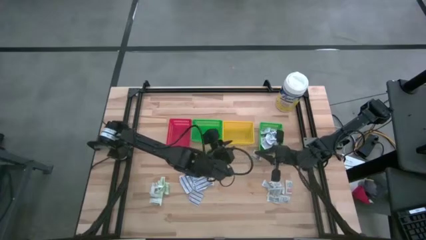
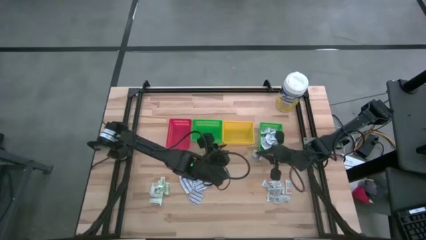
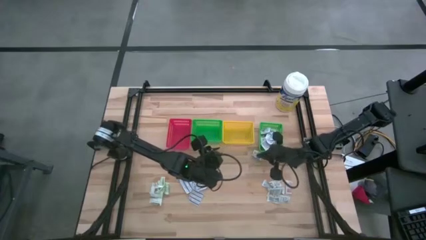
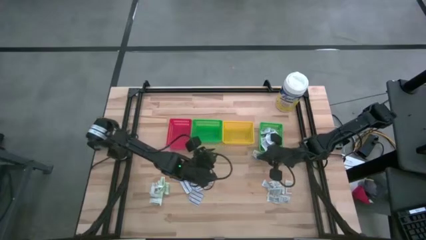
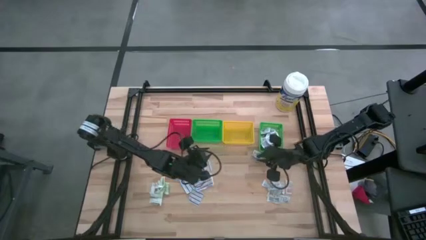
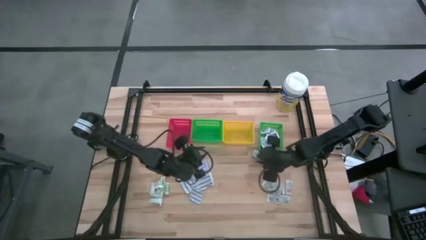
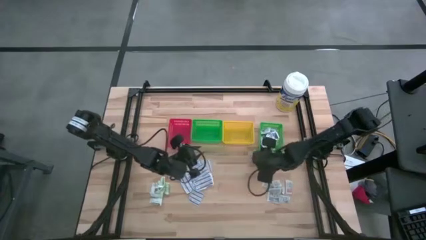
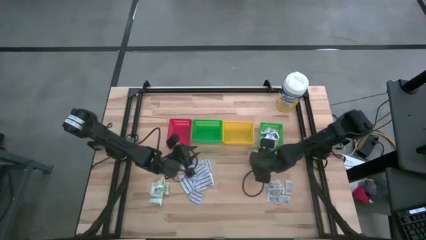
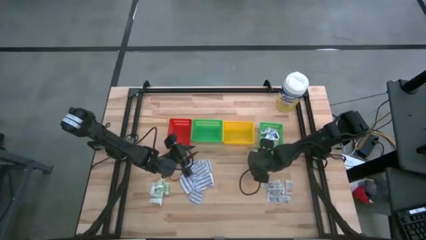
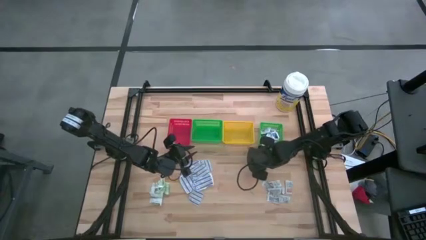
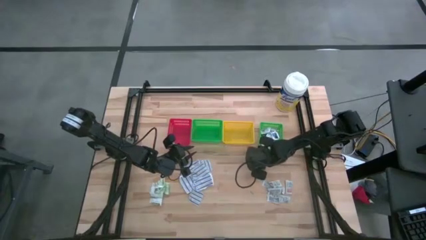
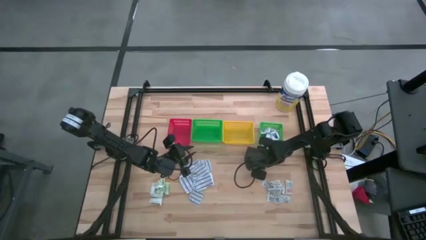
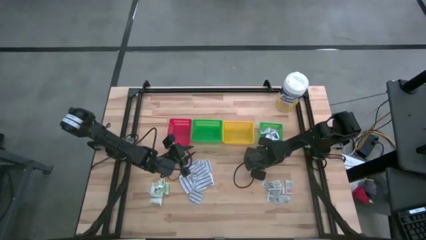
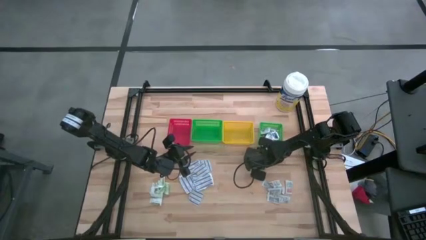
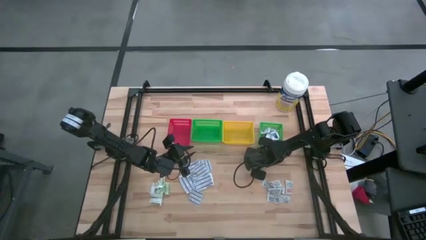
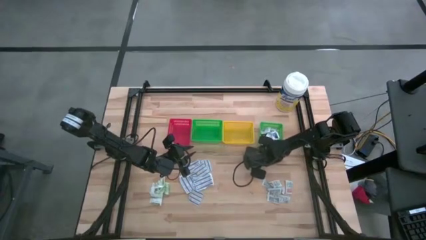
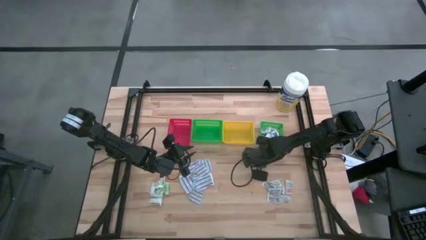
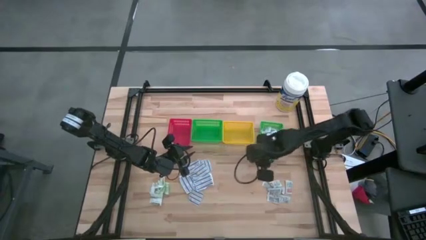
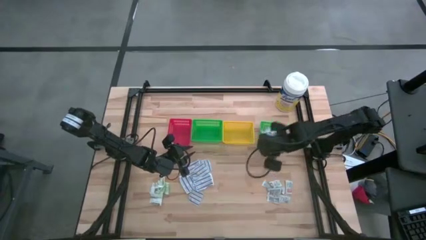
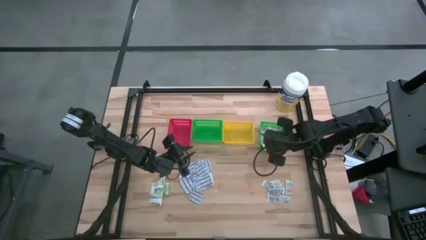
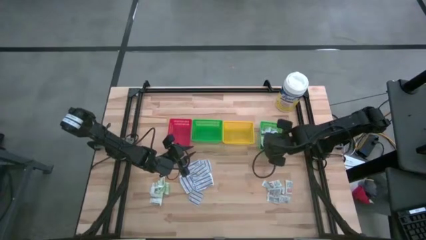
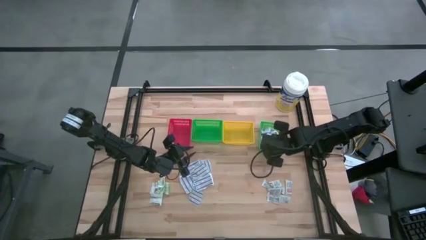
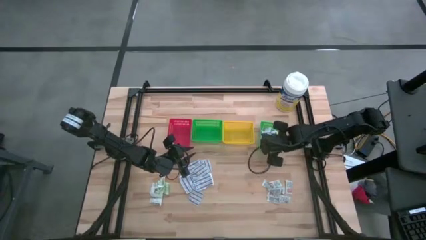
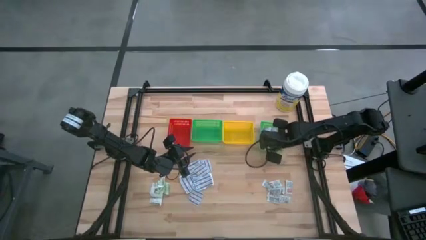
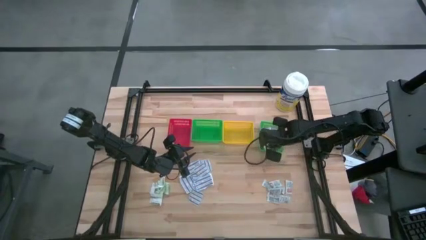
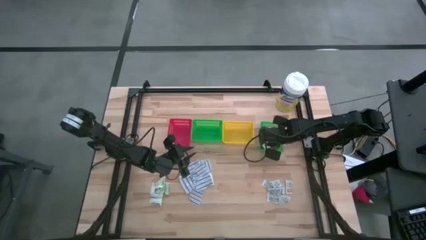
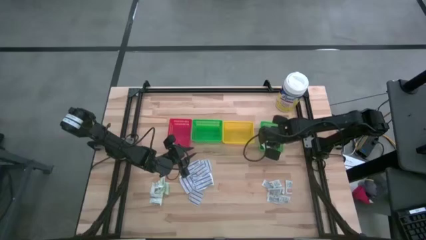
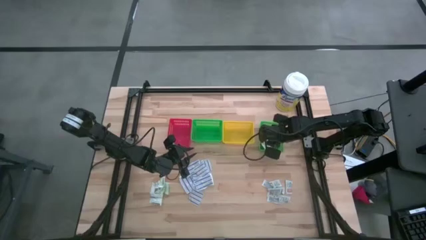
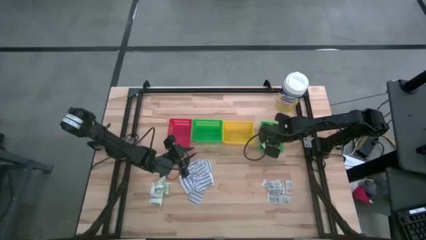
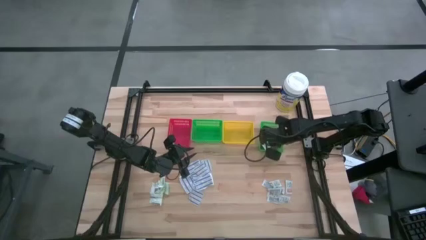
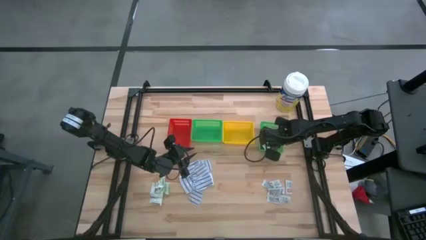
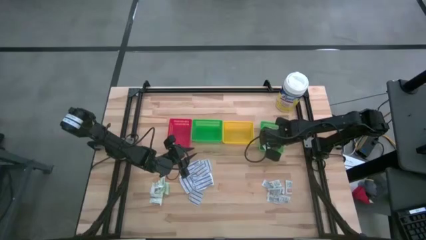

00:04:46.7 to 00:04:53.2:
Task: Pick & Place First Aid Supplies
Put the blue alcohol pad into the right green bin

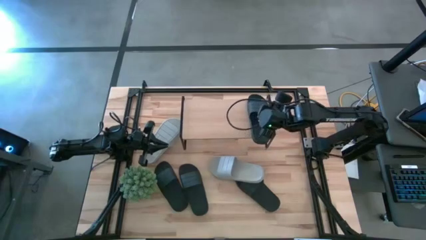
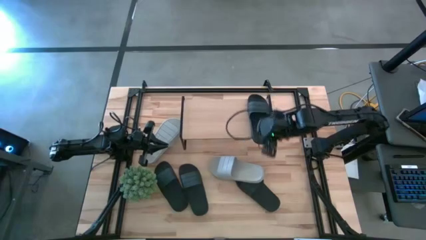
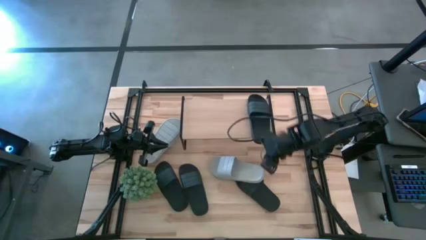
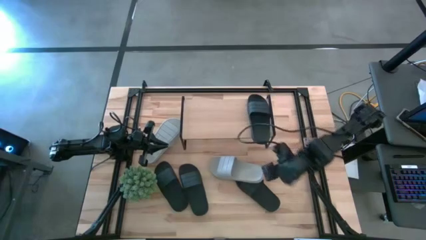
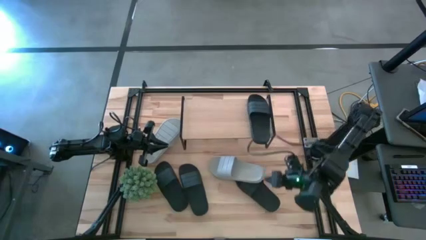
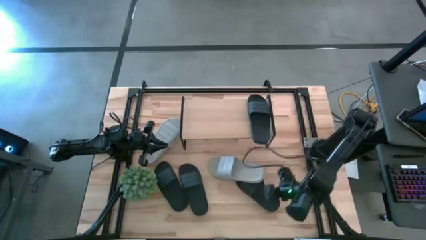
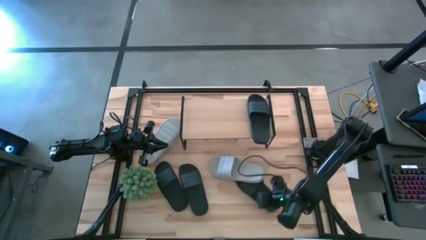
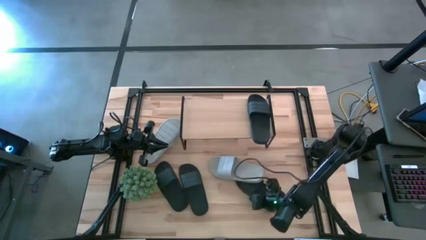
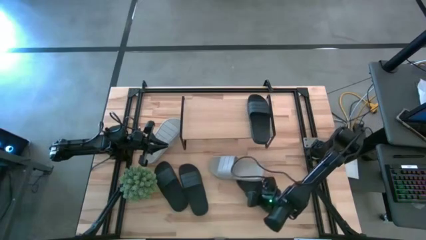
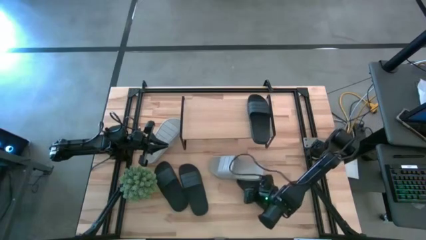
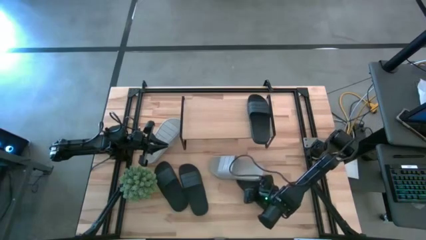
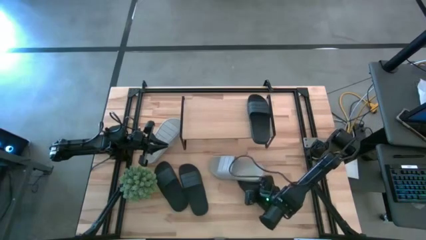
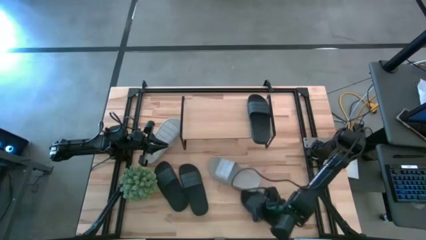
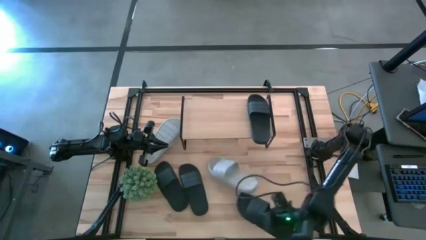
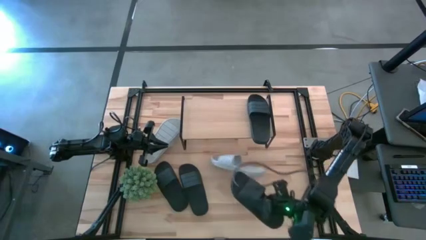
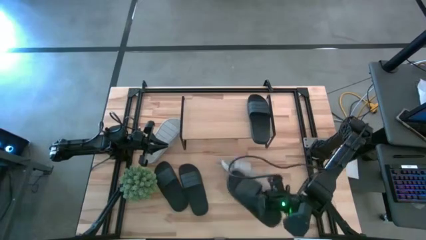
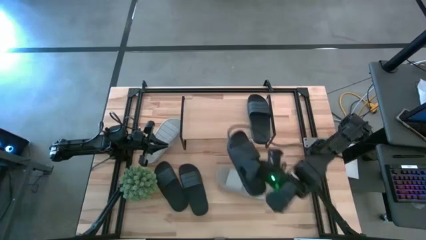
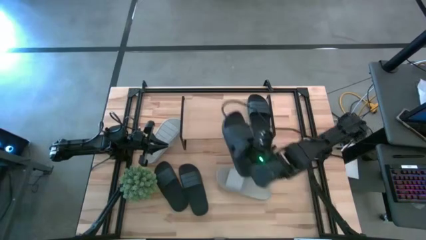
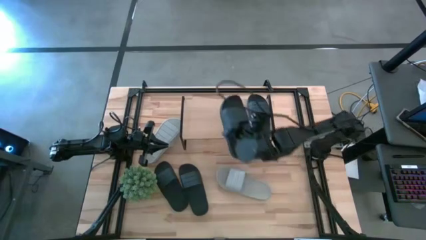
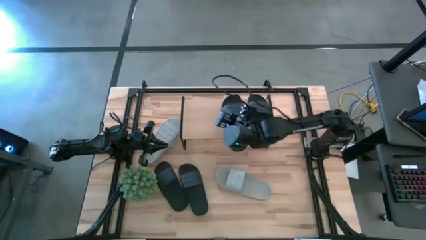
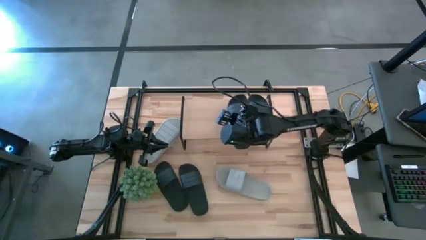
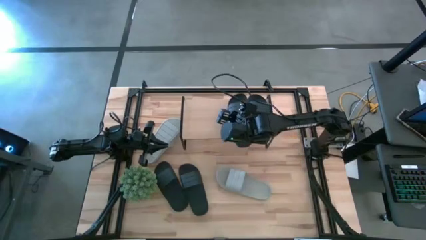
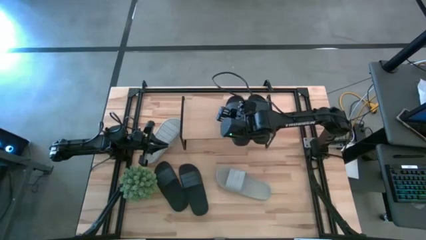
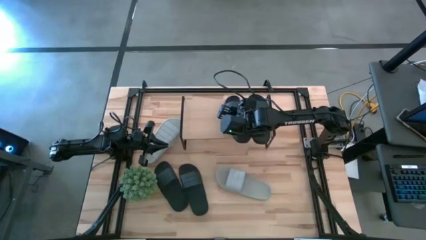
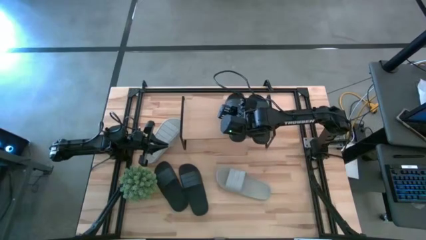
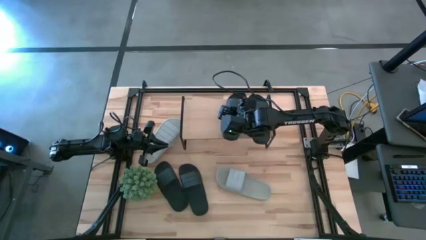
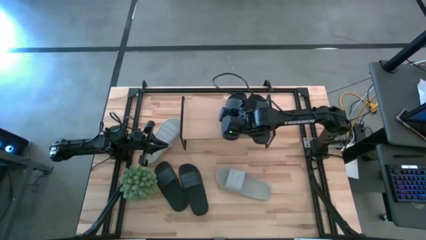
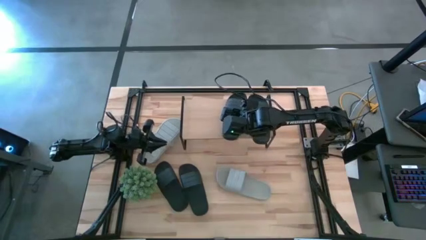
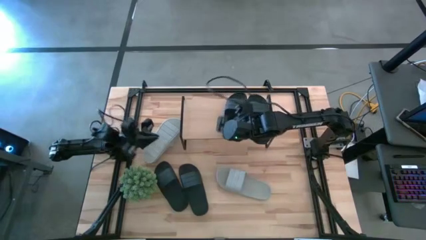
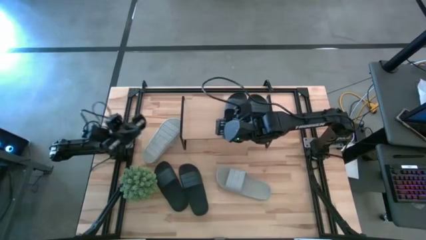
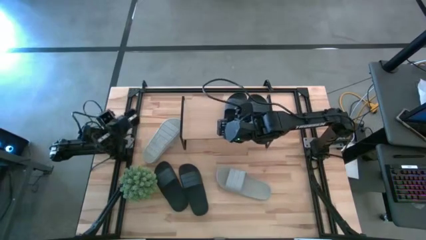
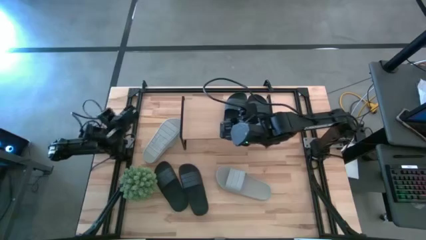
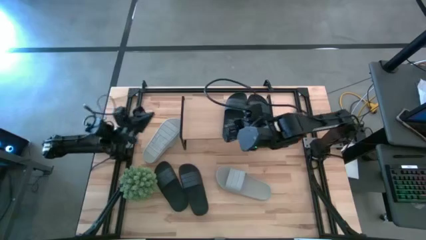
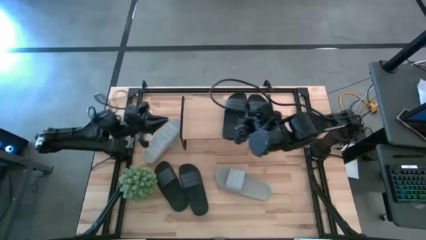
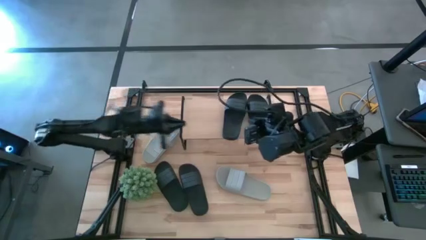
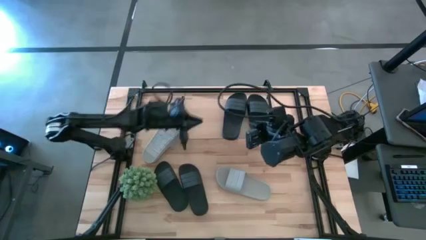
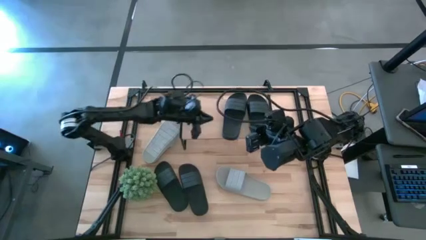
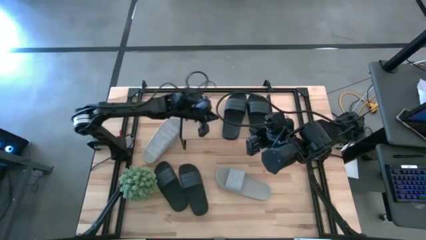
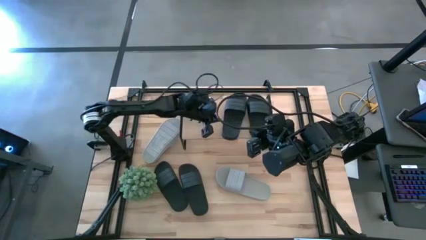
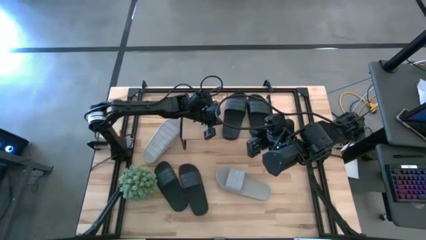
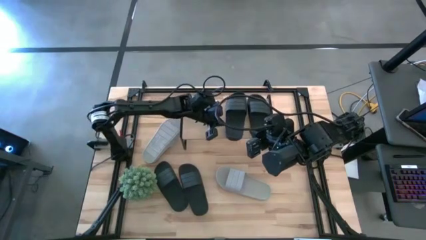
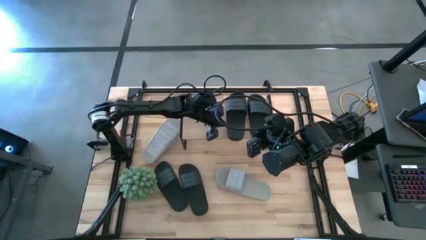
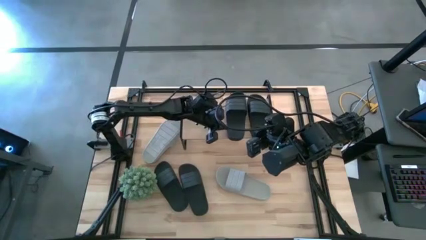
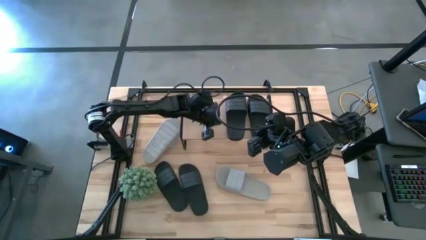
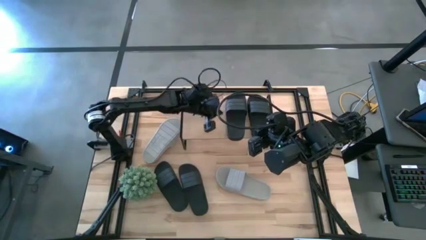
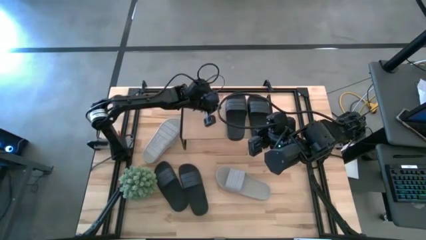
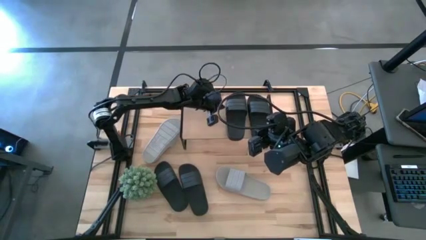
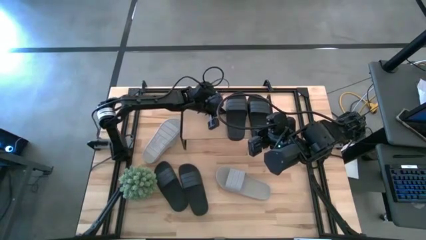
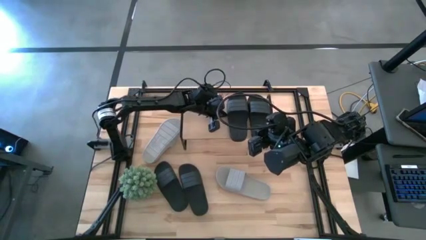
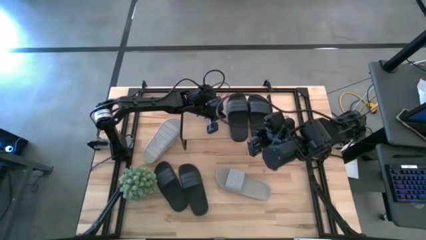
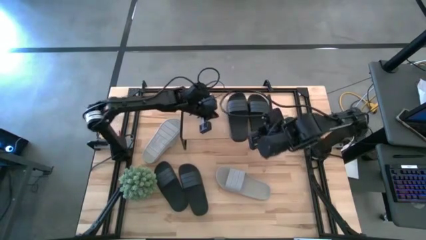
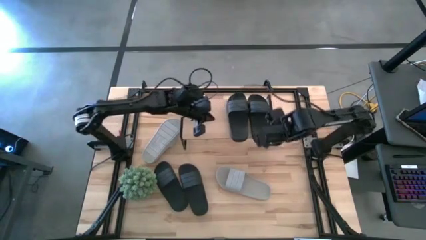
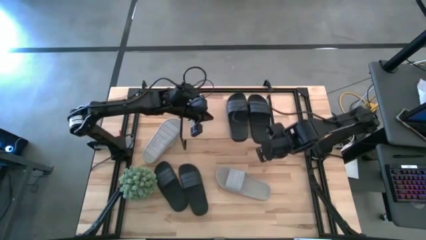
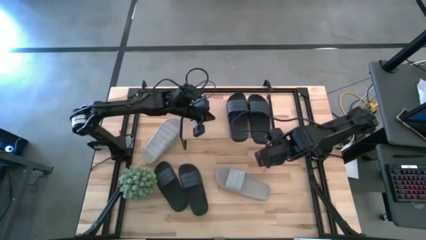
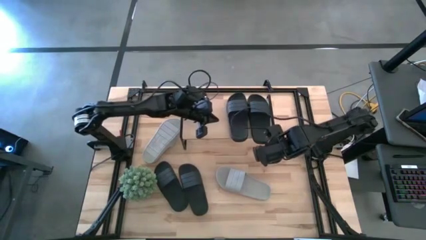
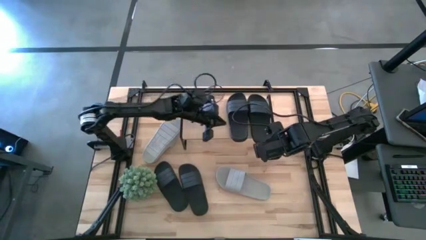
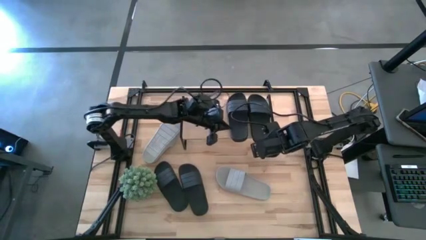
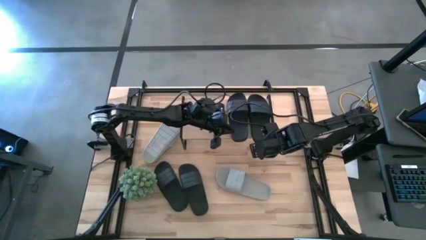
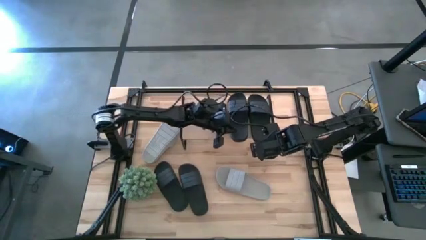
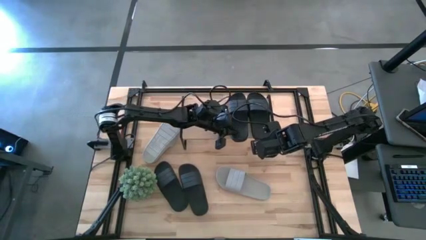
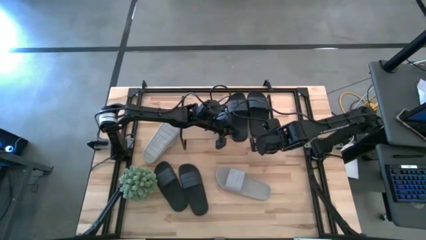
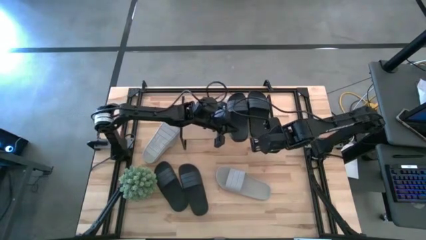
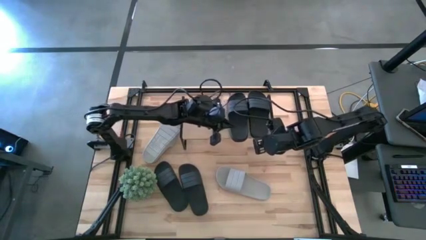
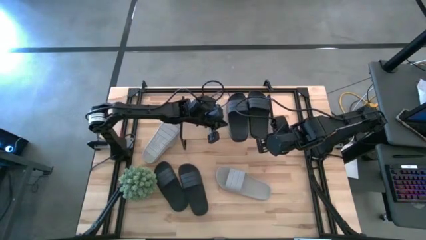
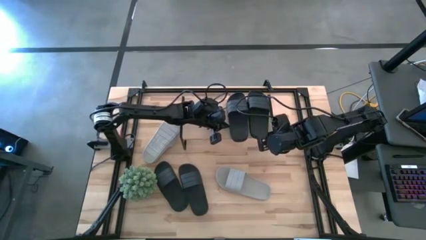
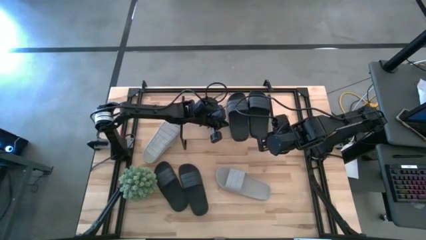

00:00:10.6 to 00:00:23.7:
Task: Pick and place slides into the shelf
Put the right black slipper on the shelf
